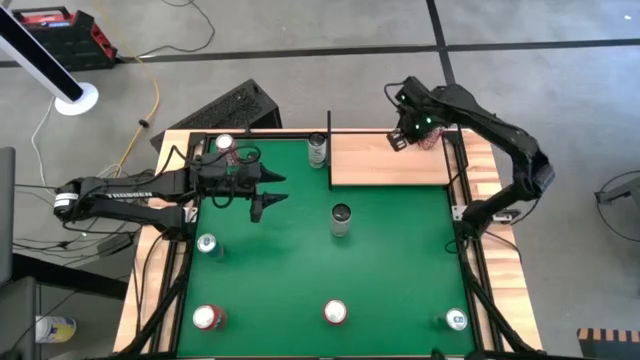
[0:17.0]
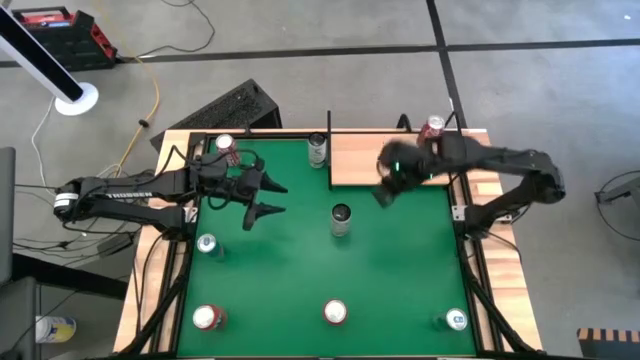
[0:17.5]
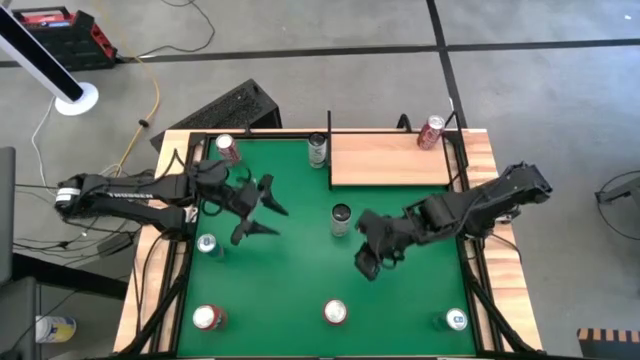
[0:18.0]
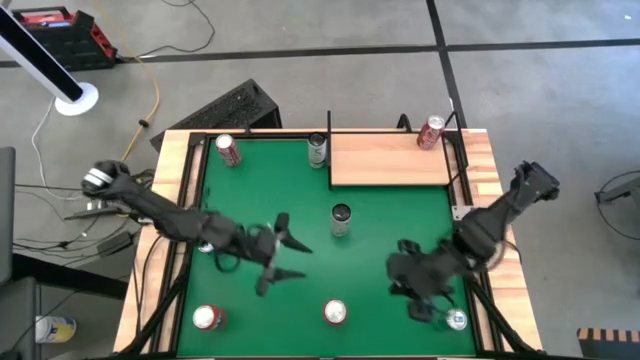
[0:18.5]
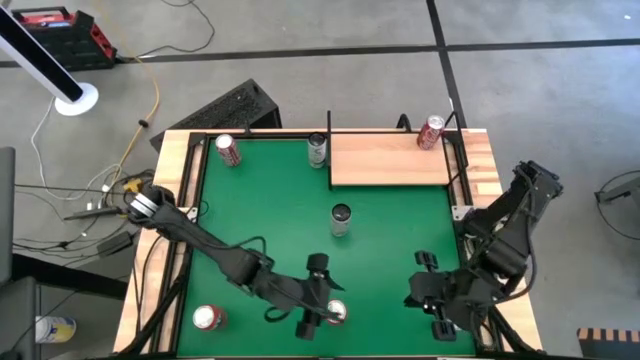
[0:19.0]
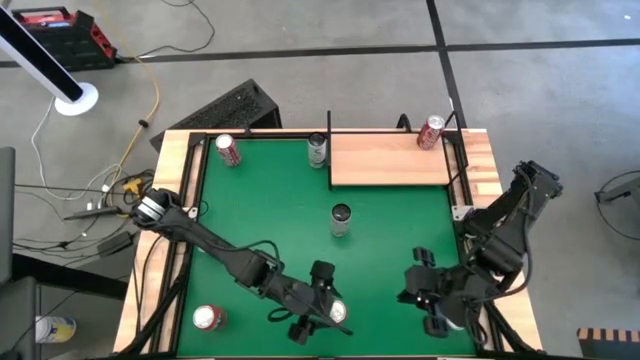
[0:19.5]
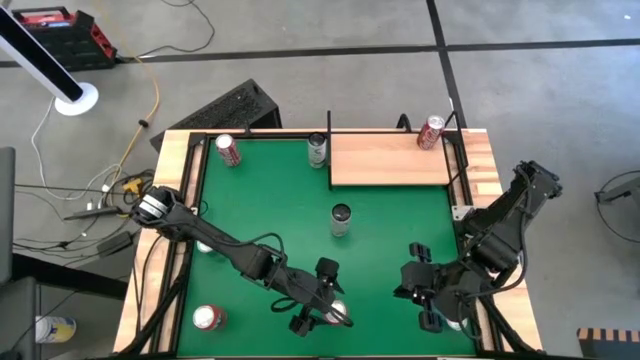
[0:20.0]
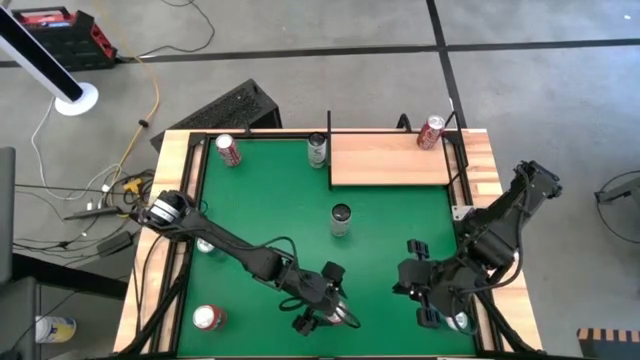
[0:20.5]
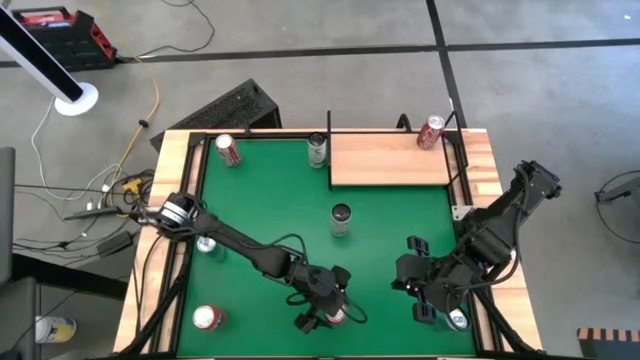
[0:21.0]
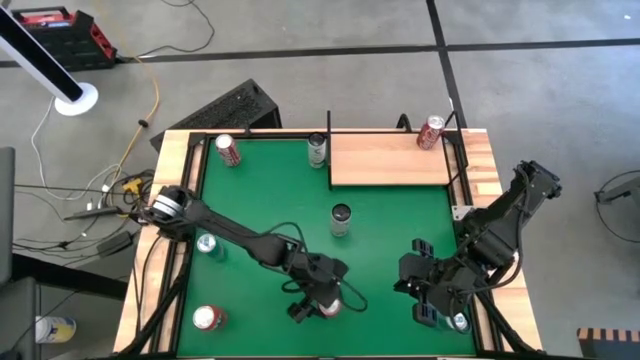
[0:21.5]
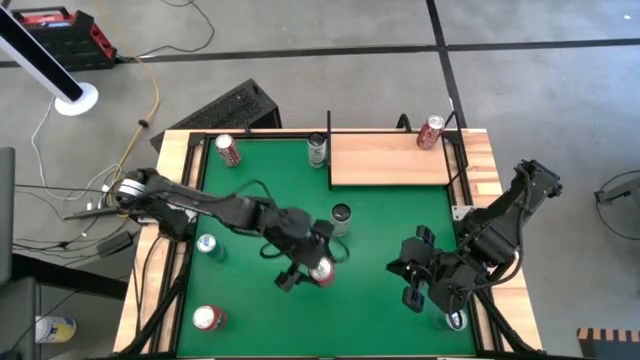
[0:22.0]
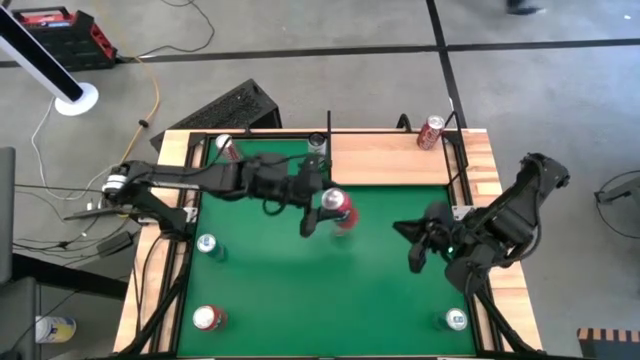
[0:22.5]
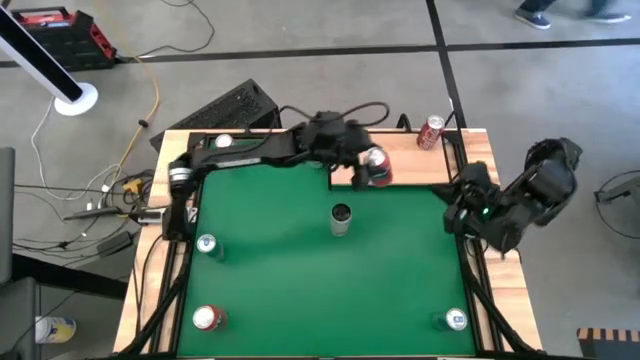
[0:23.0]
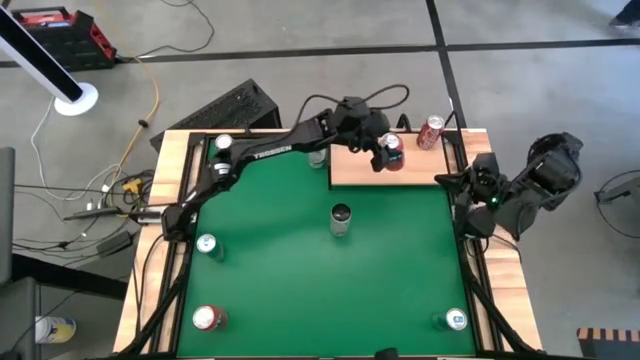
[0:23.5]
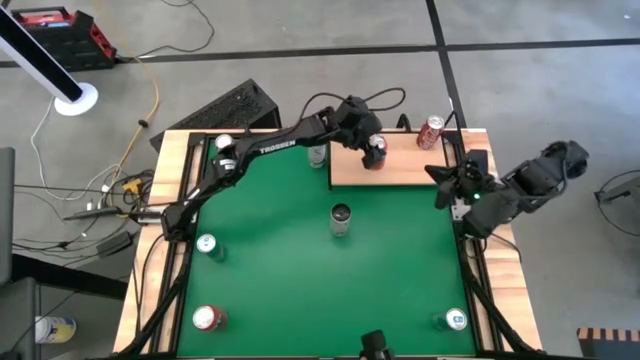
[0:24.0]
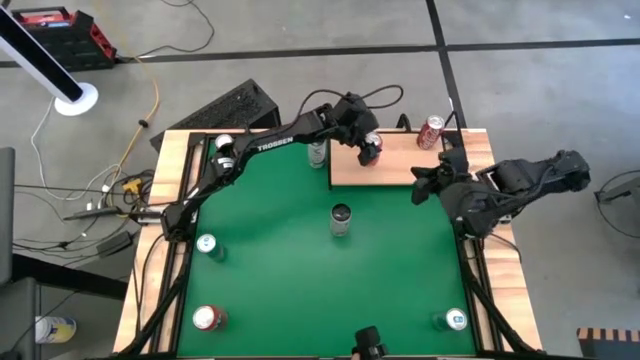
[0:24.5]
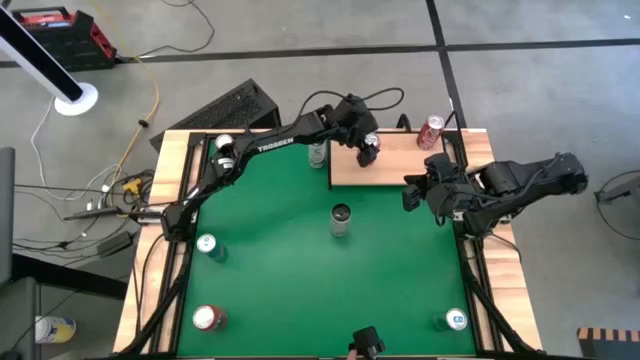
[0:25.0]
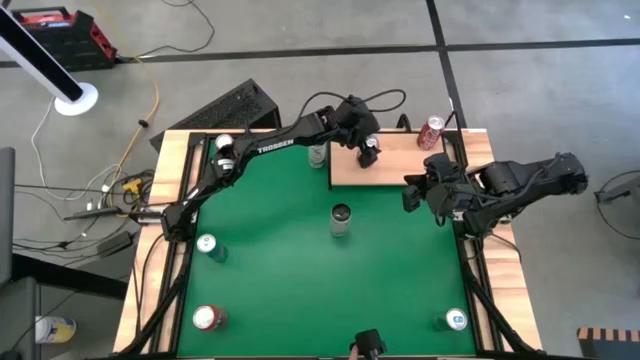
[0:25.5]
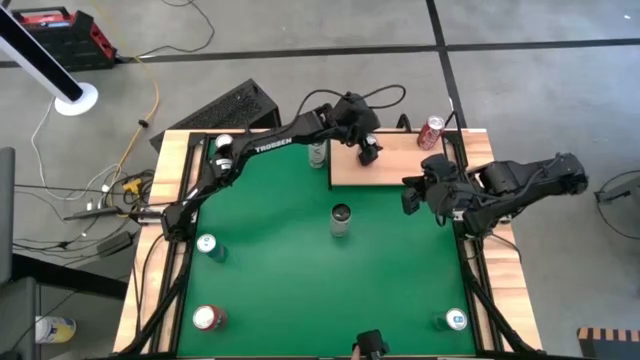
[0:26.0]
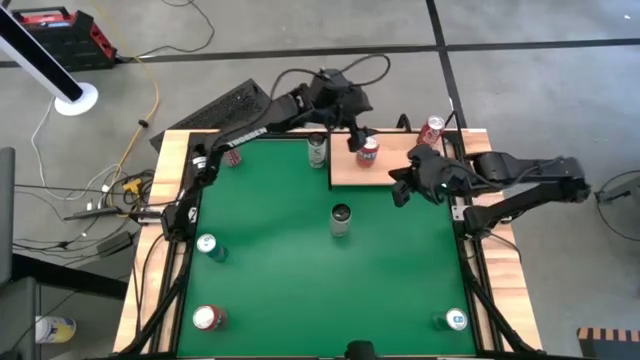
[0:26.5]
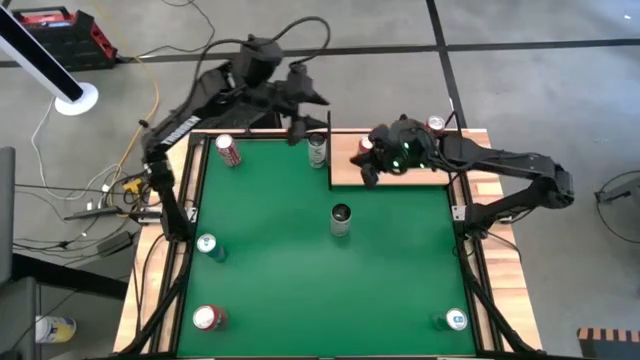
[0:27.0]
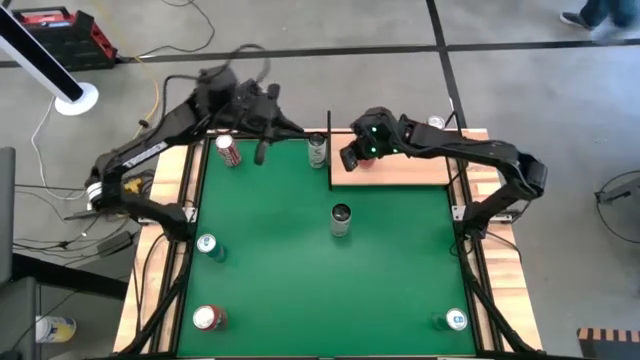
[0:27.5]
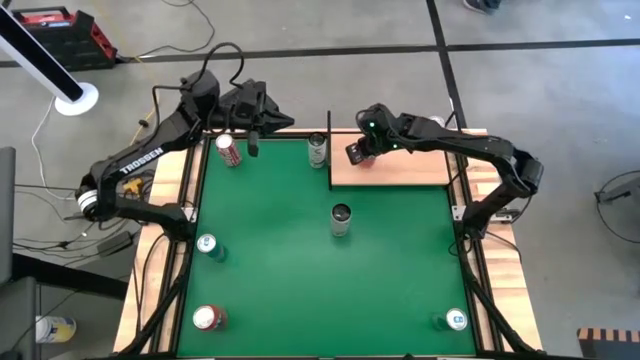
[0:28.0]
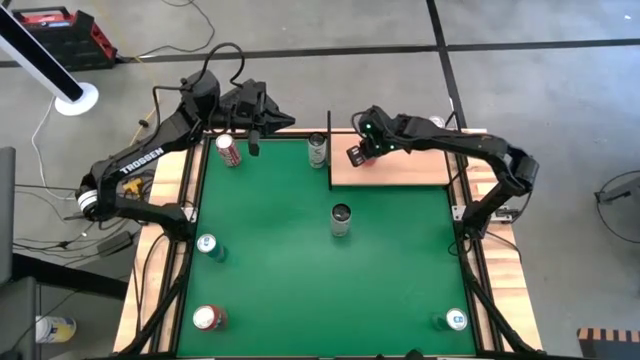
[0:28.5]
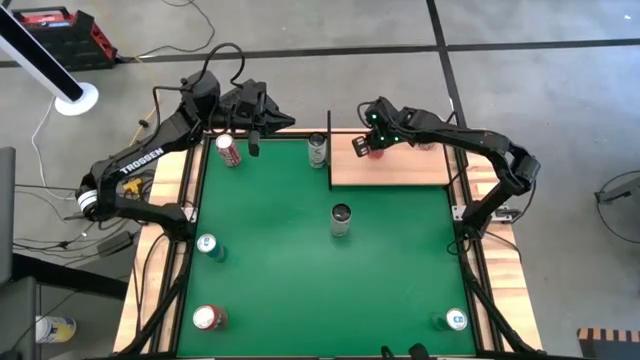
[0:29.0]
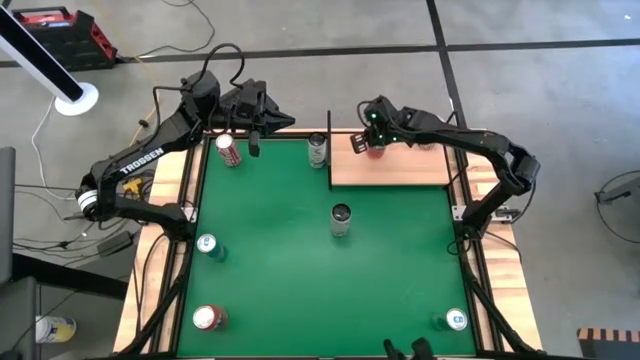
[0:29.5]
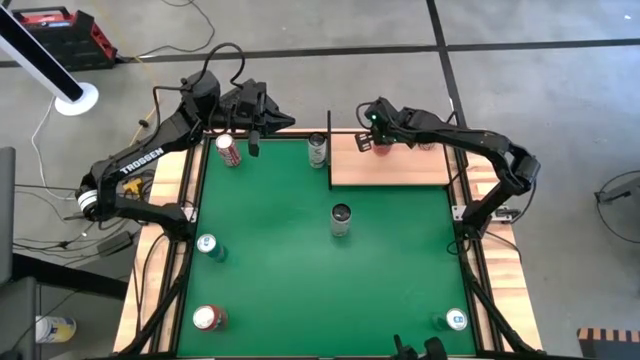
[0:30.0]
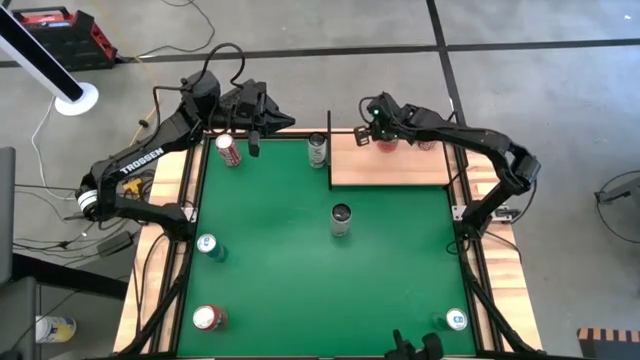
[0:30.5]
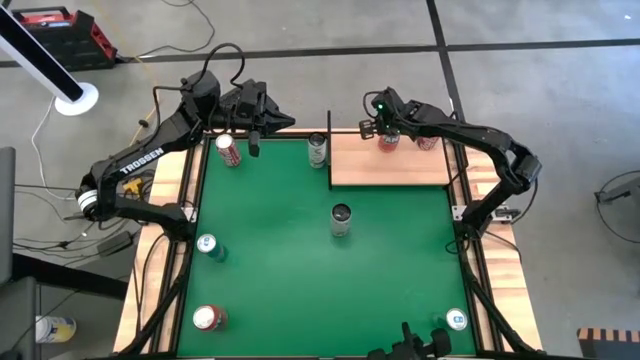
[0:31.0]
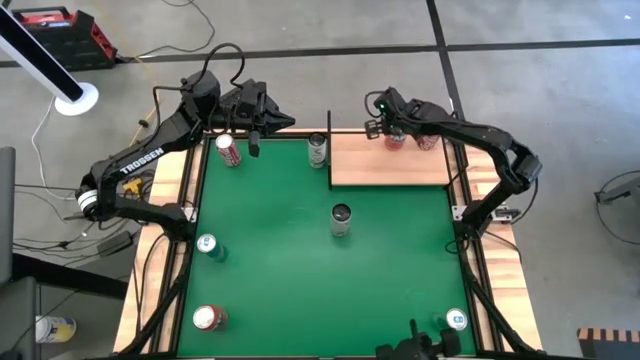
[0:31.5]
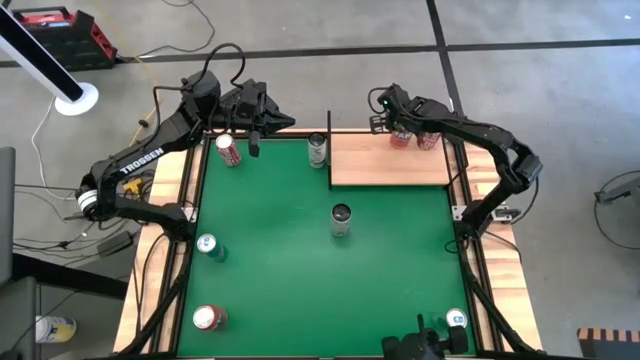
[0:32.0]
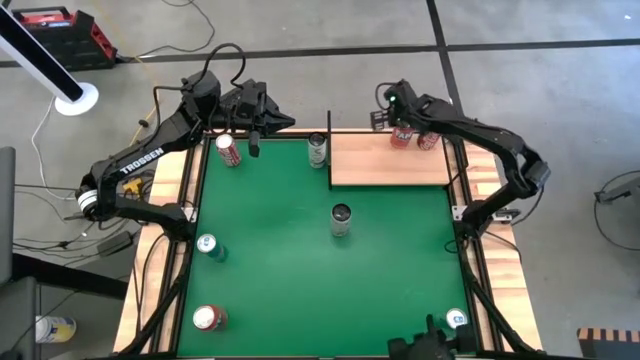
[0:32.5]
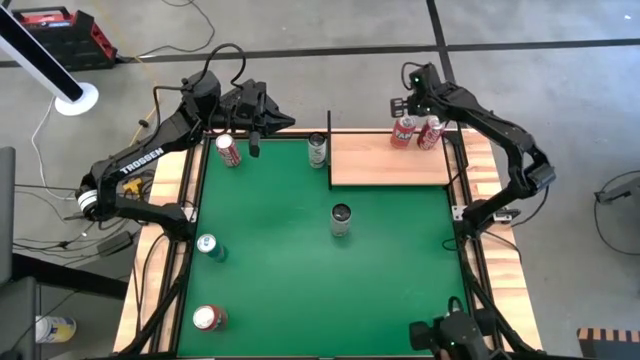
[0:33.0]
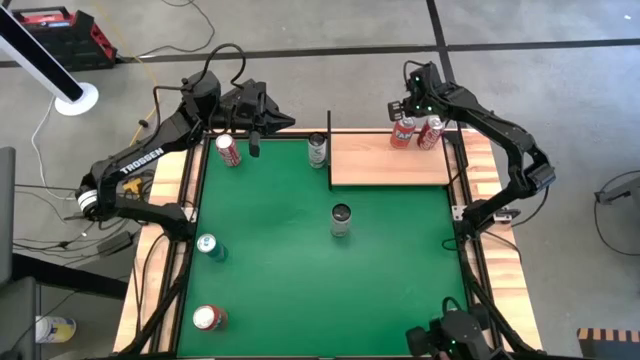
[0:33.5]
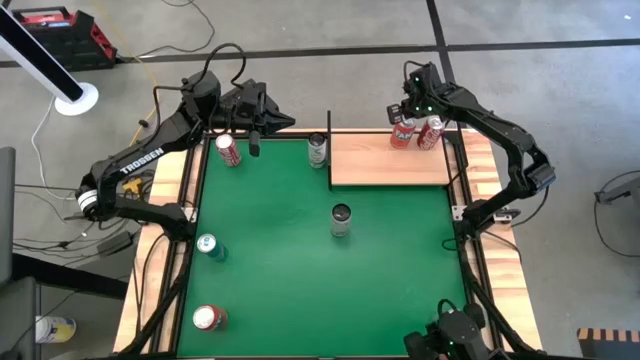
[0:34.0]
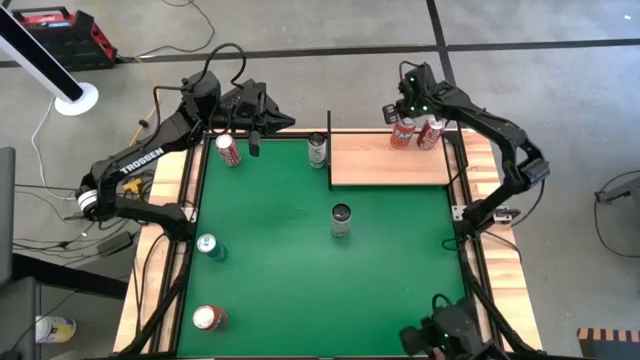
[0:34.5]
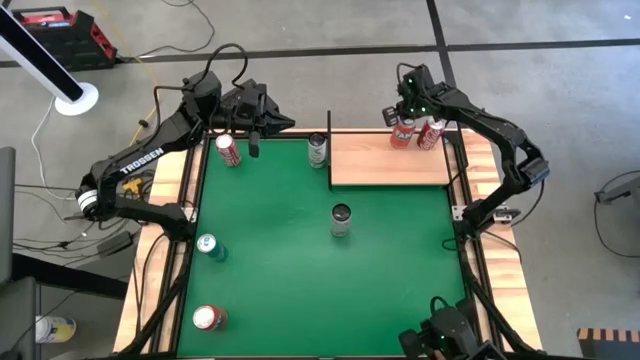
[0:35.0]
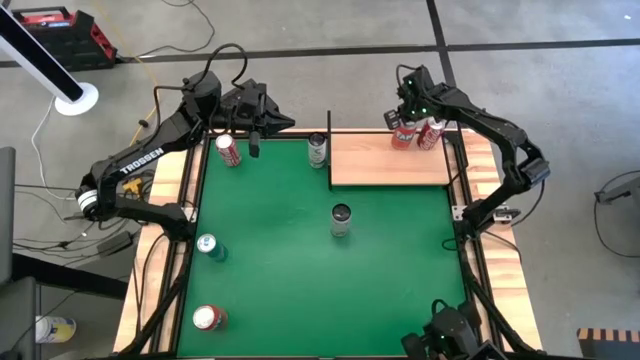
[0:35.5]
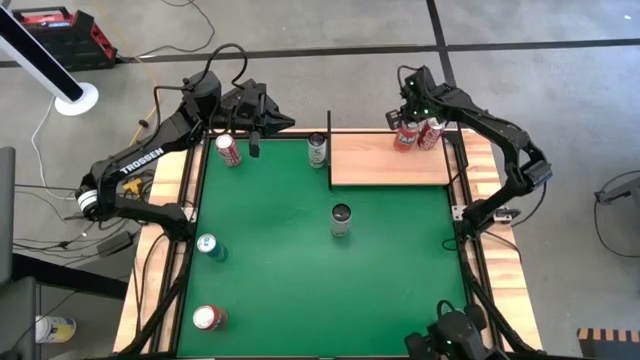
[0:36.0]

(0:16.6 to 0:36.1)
Task: Place canned beverage on shelf
Put the right orange soda can on the shelf
